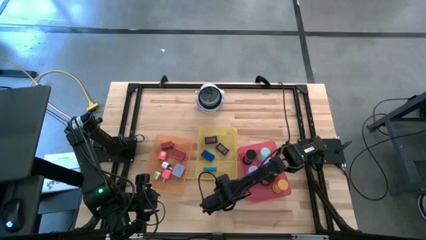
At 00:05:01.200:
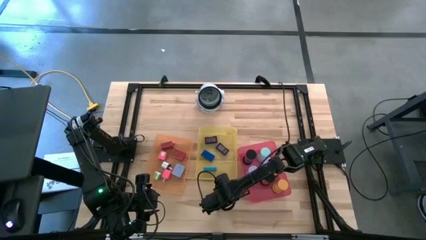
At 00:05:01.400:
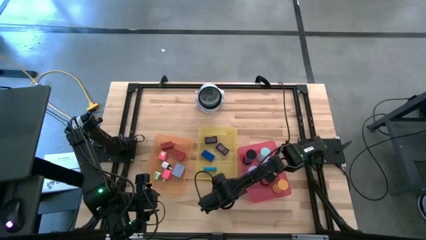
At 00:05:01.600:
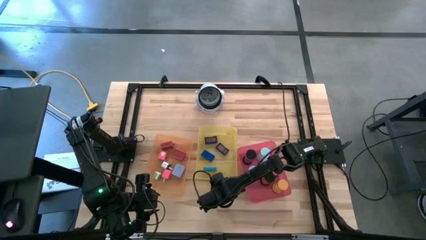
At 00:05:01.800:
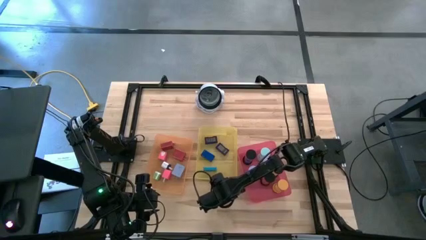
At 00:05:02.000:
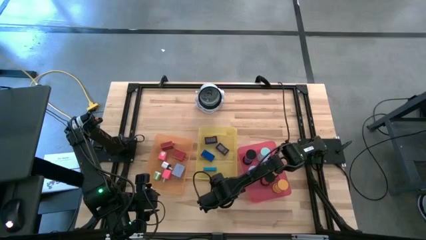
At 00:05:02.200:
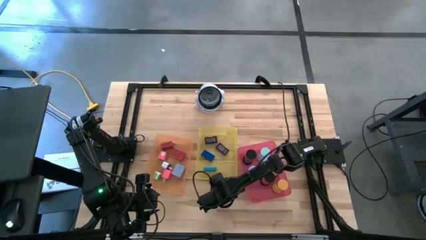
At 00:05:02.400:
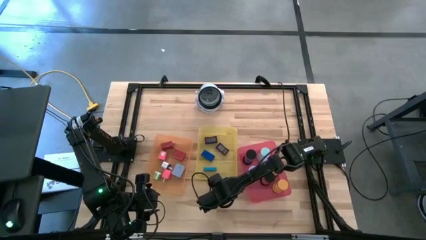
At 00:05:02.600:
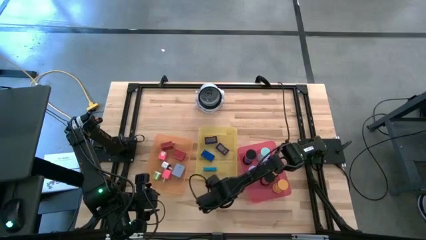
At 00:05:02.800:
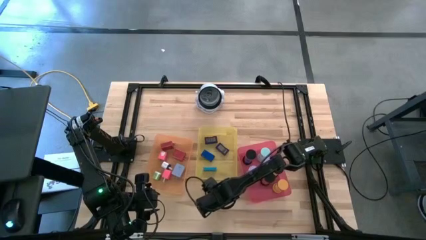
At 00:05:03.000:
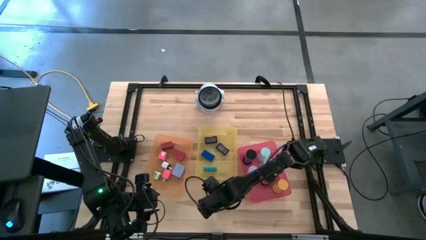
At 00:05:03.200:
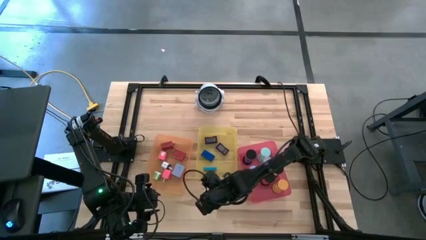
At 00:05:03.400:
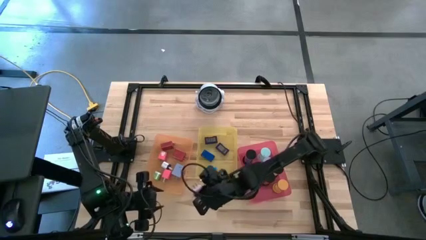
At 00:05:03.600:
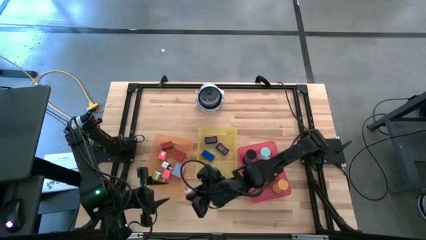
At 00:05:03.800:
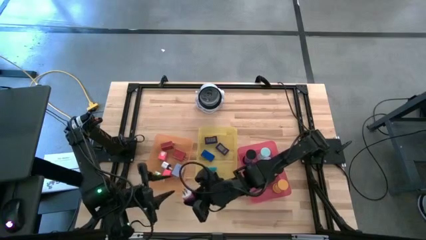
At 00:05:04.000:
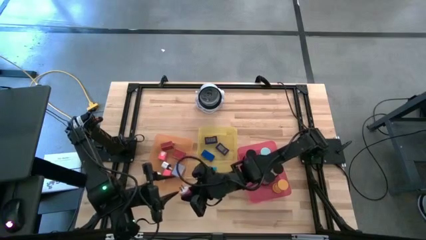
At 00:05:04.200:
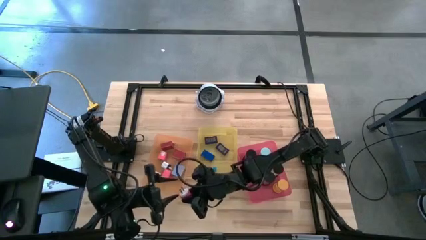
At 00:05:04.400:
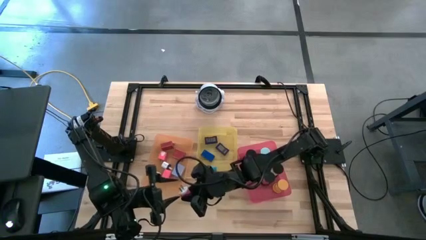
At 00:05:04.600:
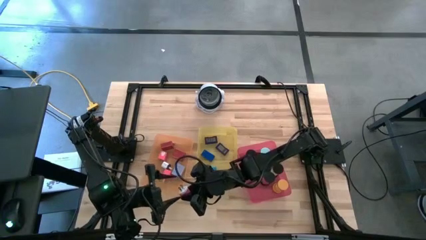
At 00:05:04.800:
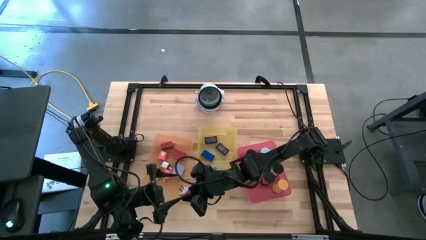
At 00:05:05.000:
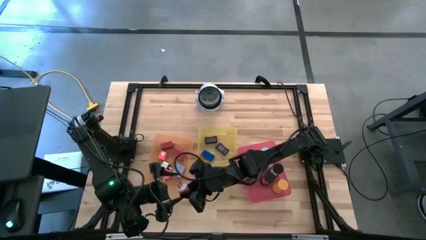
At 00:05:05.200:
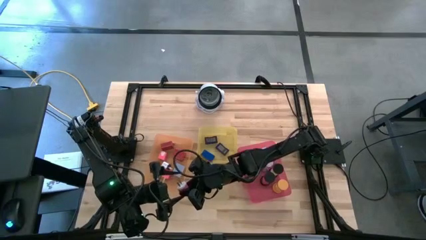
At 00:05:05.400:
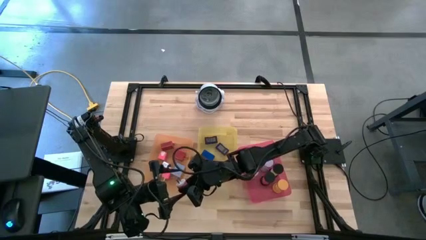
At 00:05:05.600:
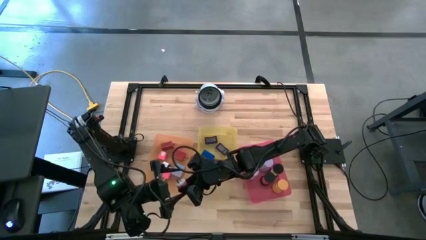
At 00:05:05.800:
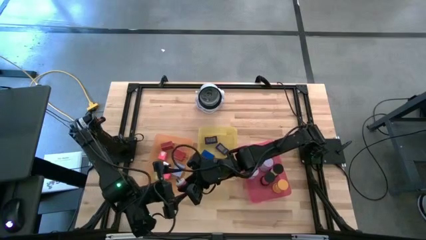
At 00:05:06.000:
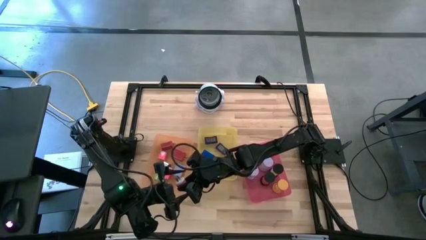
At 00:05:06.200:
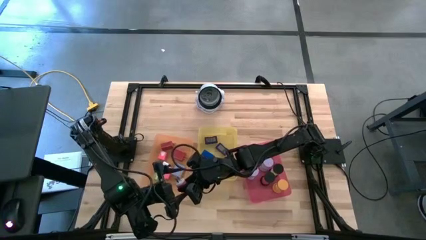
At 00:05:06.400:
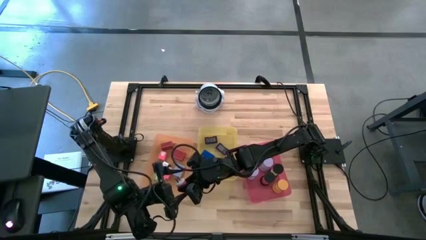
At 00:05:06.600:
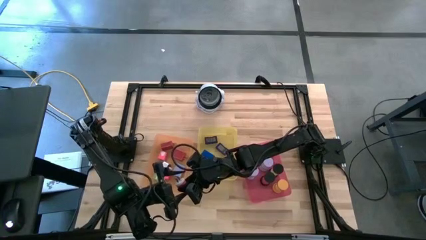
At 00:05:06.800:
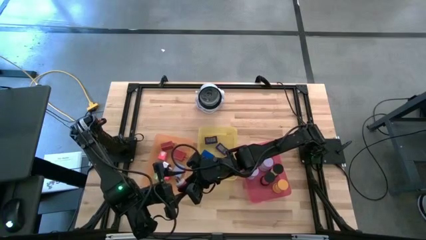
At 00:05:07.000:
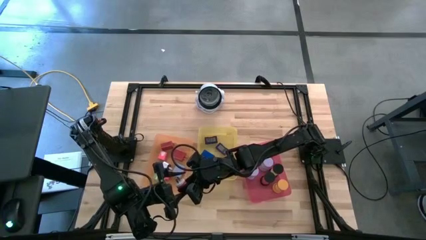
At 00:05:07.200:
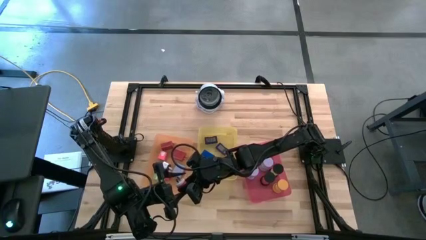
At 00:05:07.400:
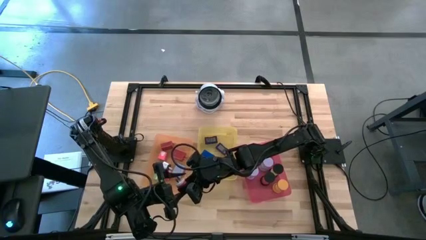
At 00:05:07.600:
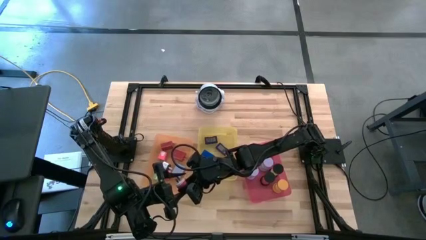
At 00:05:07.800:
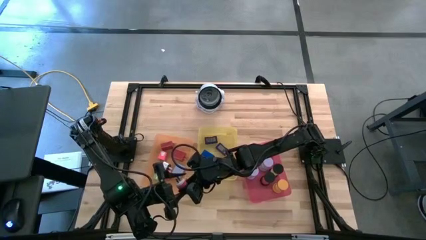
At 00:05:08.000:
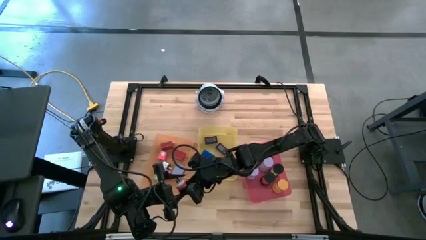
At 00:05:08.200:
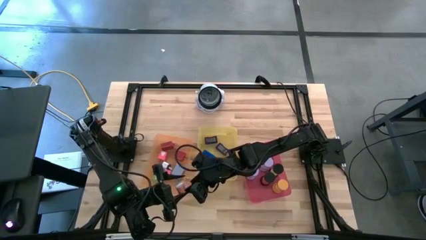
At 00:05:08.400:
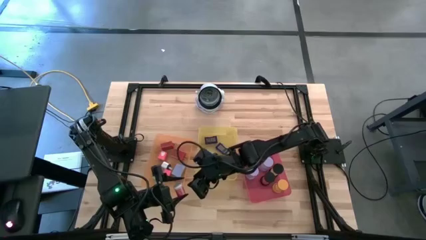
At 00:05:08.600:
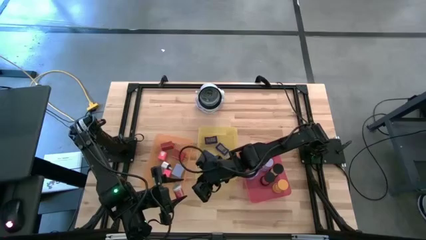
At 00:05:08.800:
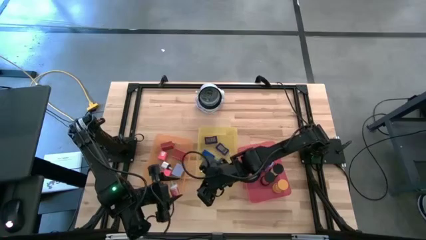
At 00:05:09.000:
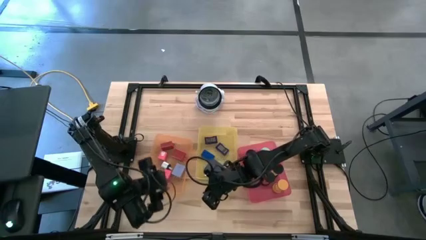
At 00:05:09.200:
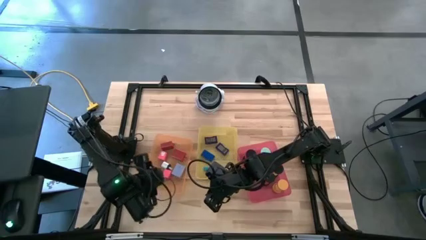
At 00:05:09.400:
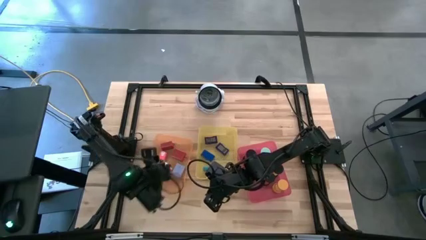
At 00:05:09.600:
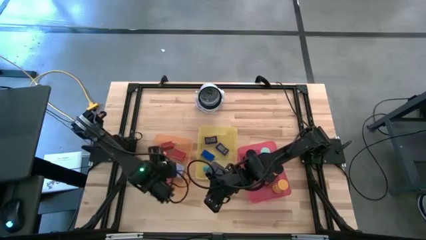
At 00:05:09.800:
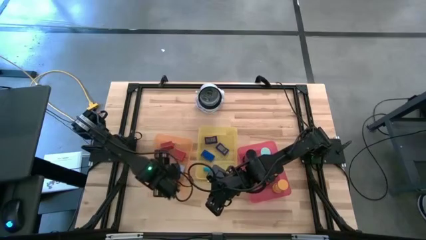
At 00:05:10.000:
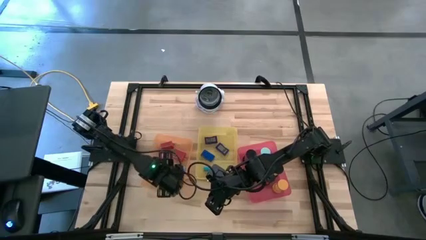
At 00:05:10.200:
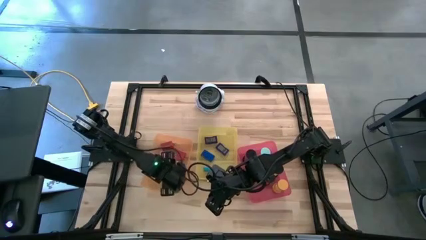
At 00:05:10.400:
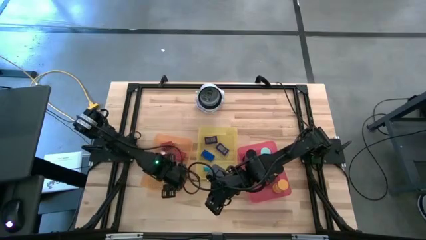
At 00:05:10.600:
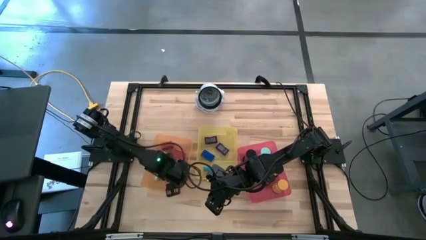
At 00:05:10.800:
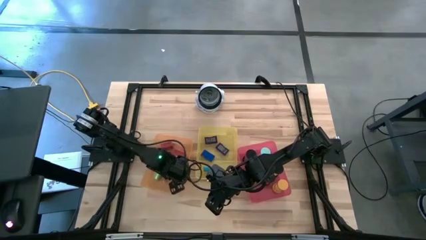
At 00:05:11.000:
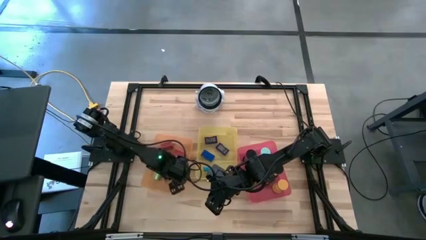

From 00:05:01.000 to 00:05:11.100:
Task: Pick & Place Office items
Put the pink charger adaptor into the orange bin
